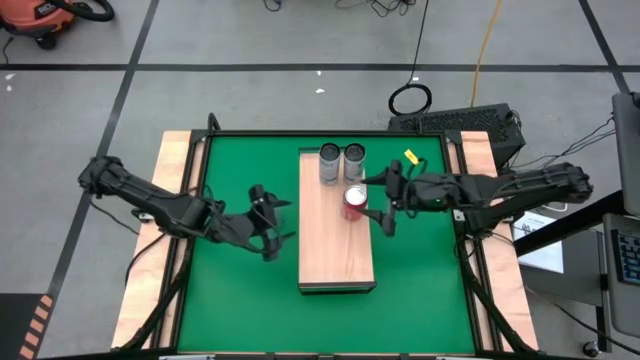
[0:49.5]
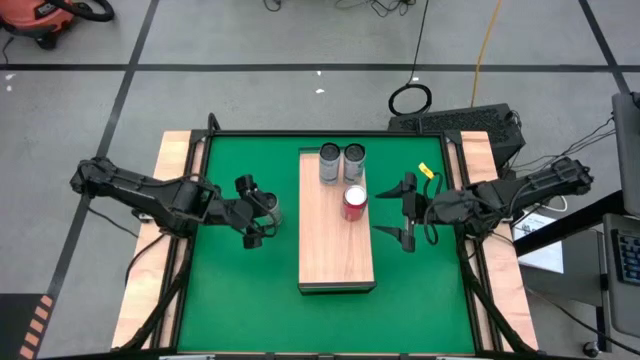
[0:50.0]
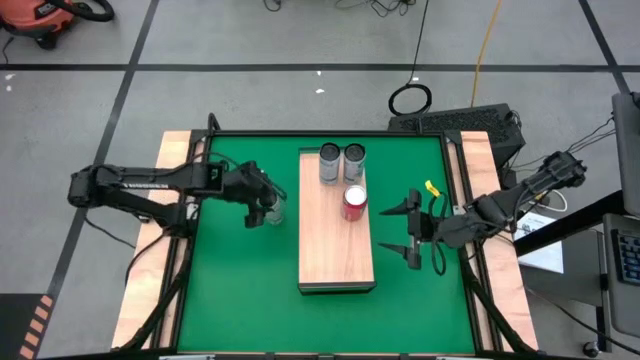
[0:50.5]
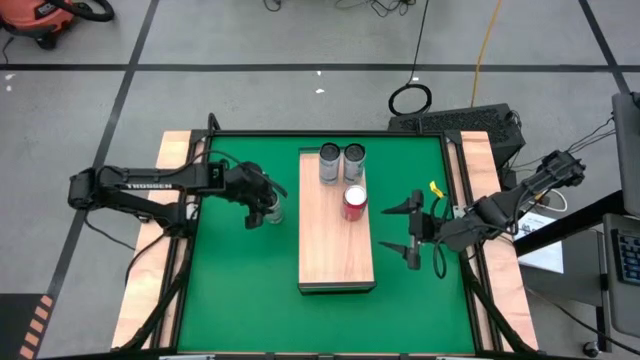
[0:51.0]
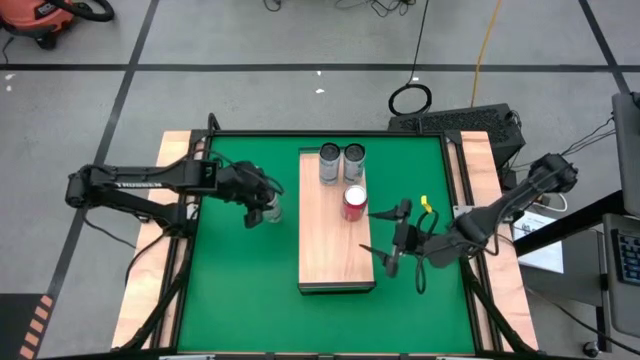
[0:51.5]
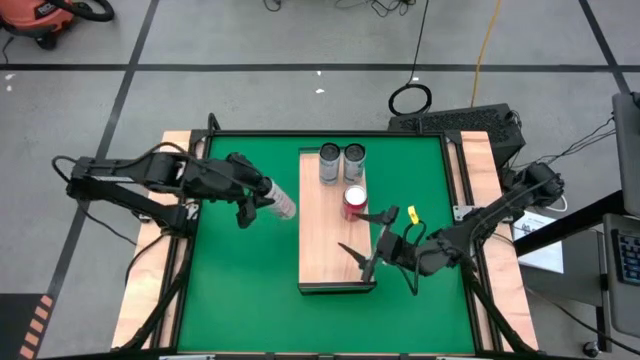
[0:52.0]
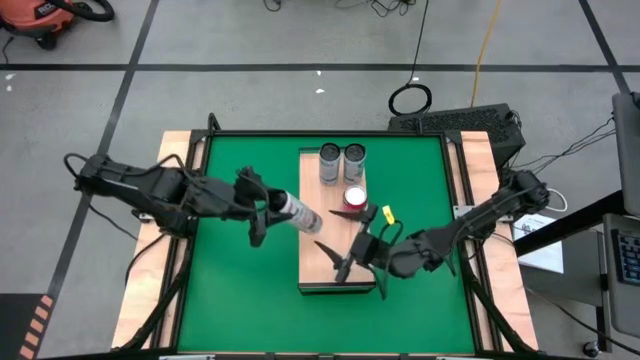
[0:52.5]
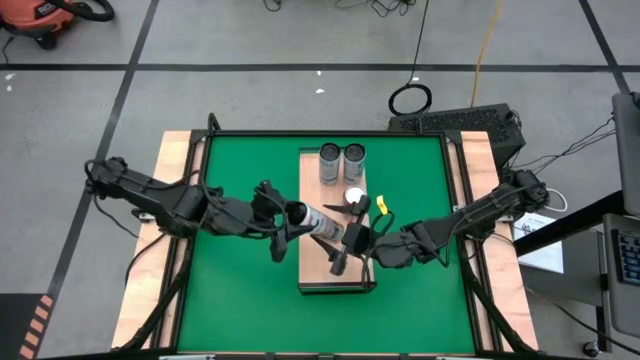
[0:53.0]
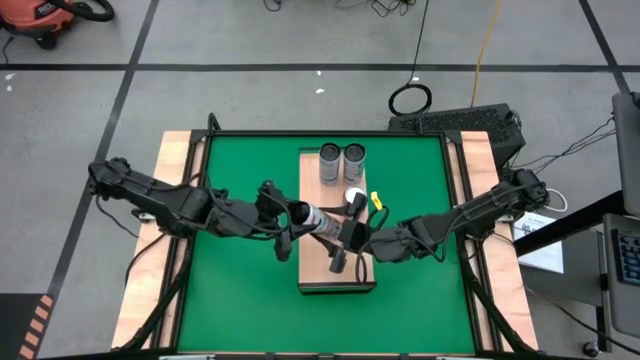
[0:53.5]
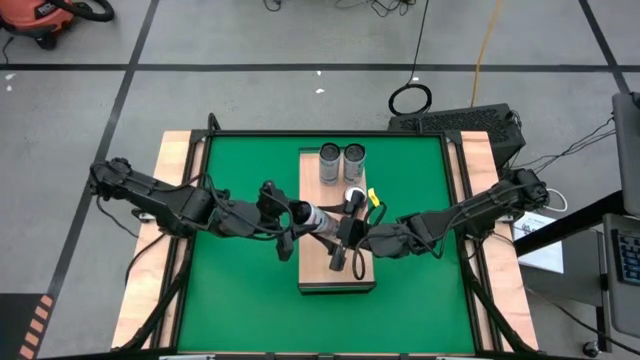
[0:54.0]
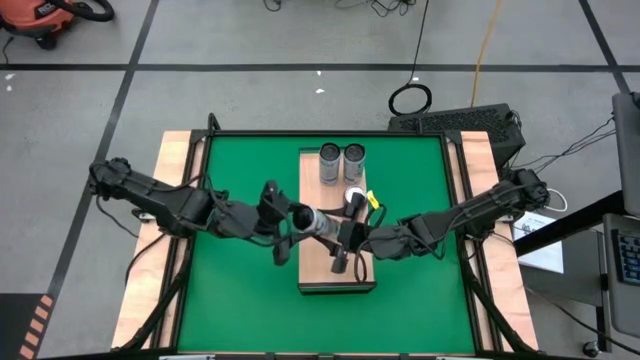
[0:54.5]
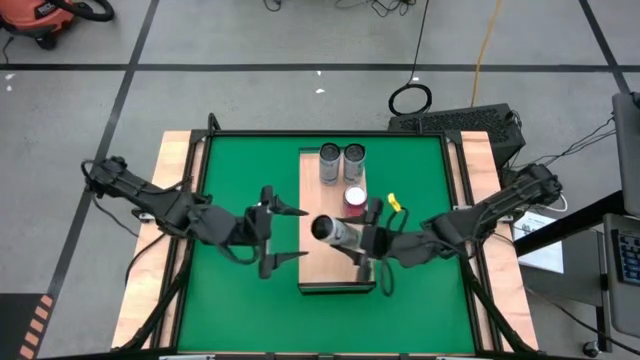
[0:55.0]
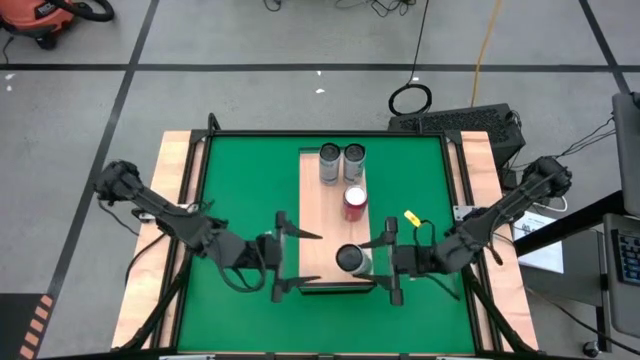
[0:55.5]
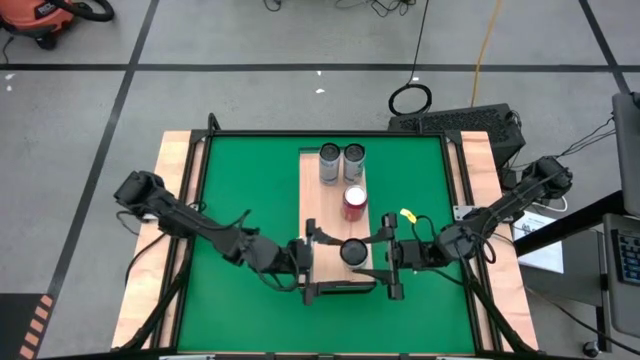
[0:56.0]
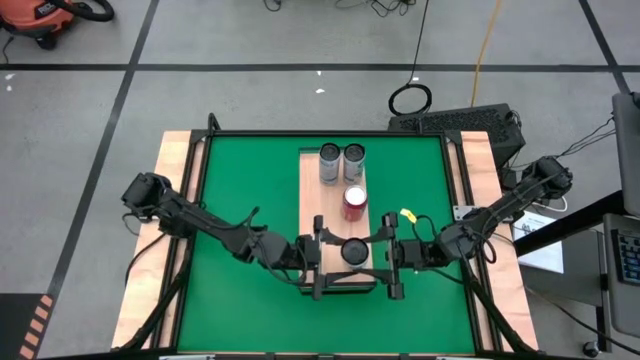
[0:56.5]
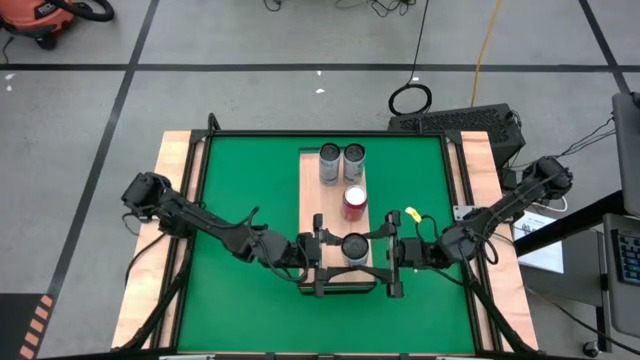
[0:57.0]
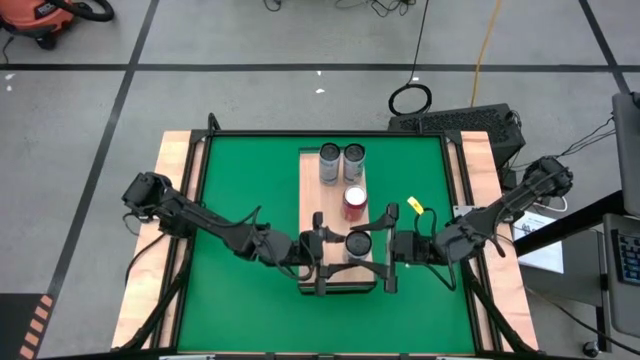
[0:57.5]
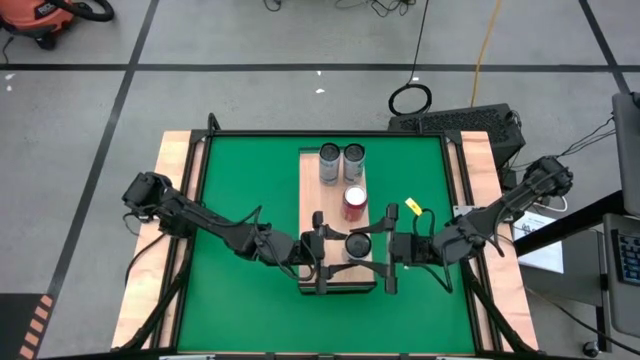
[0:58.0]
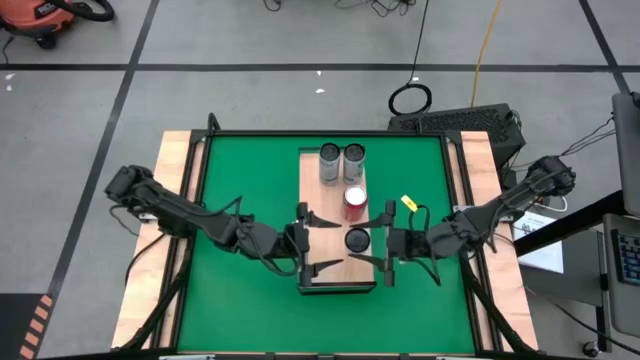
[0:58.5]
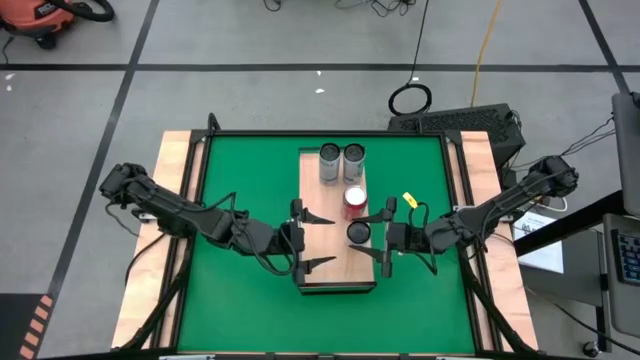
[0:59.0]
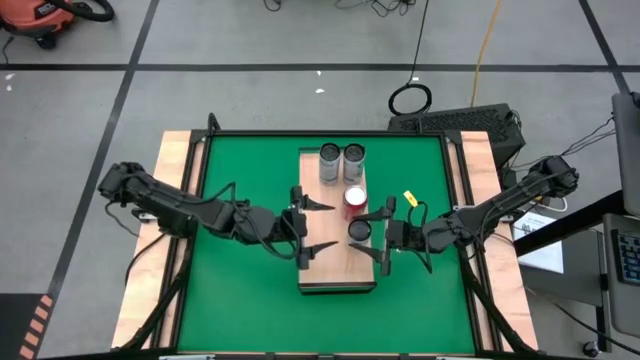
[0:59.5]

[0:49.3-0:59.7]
Task: Place canned beverage on shelf
Put the white-yellow soda can on the shelf

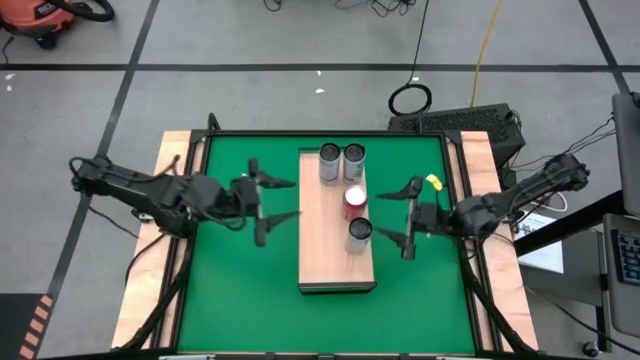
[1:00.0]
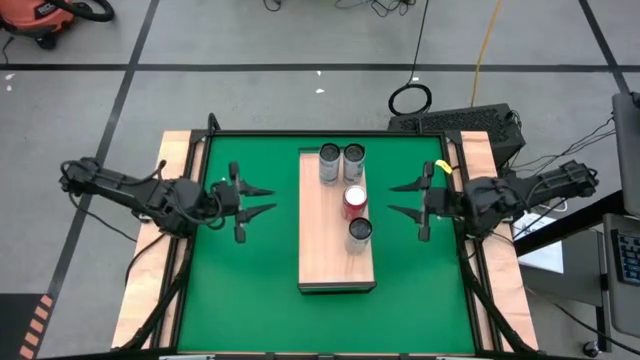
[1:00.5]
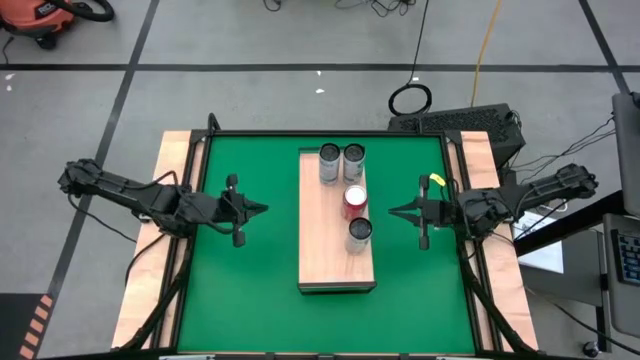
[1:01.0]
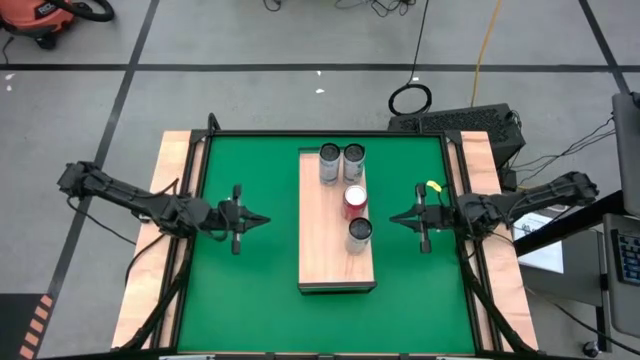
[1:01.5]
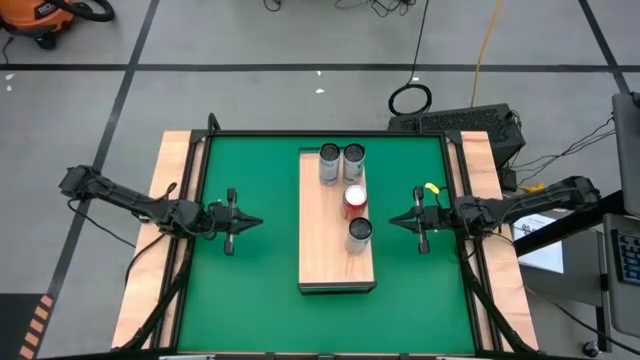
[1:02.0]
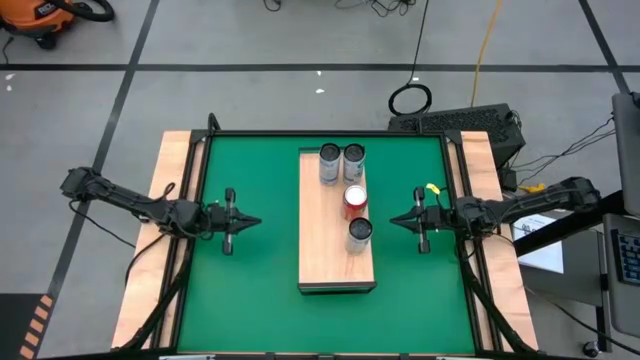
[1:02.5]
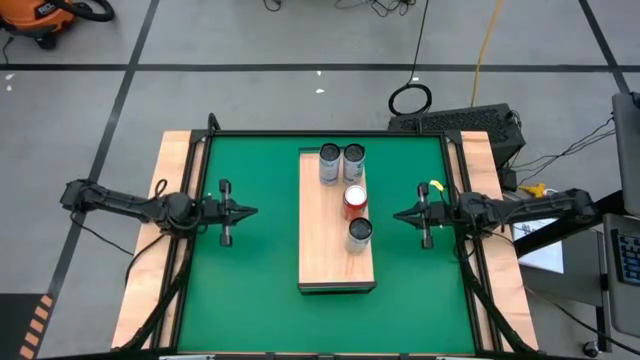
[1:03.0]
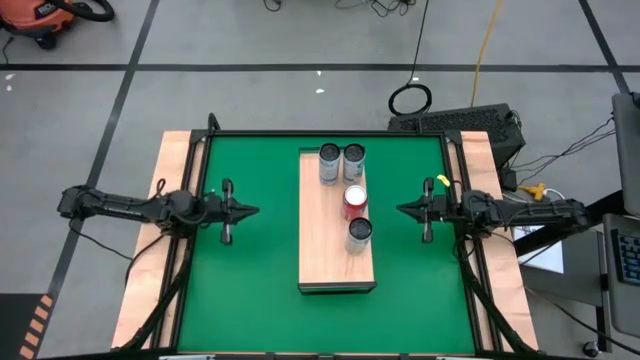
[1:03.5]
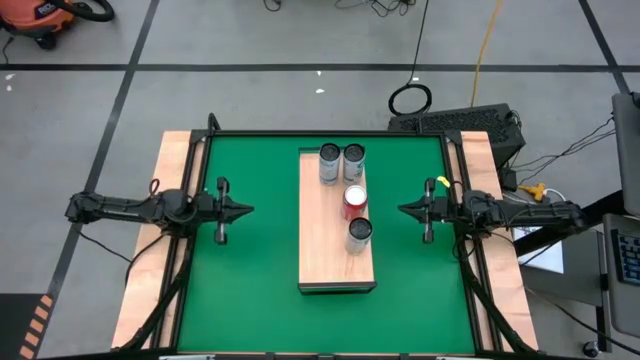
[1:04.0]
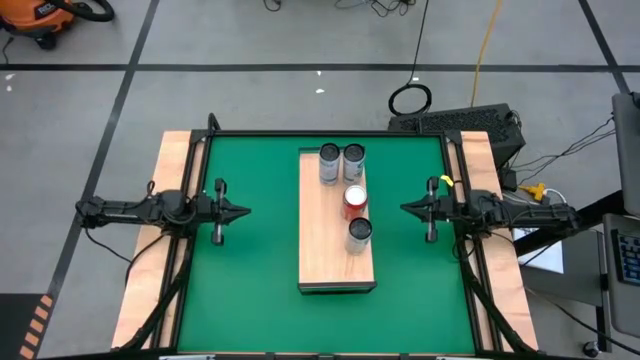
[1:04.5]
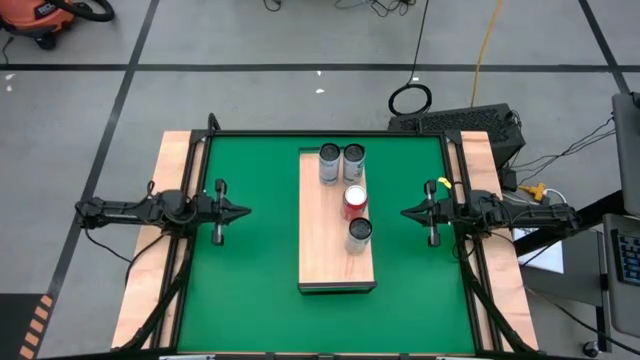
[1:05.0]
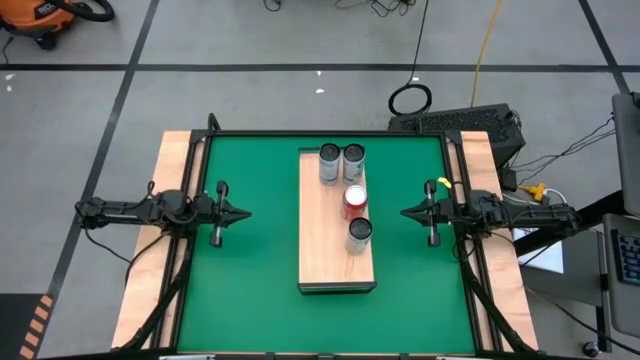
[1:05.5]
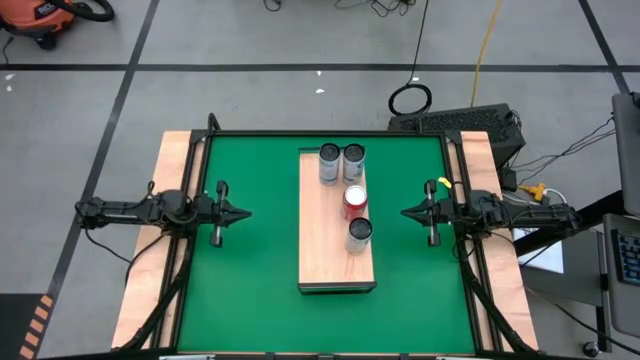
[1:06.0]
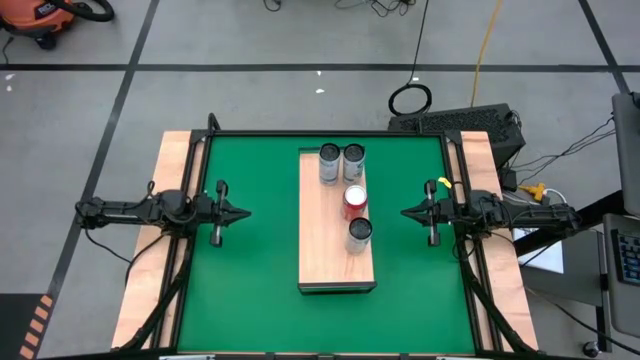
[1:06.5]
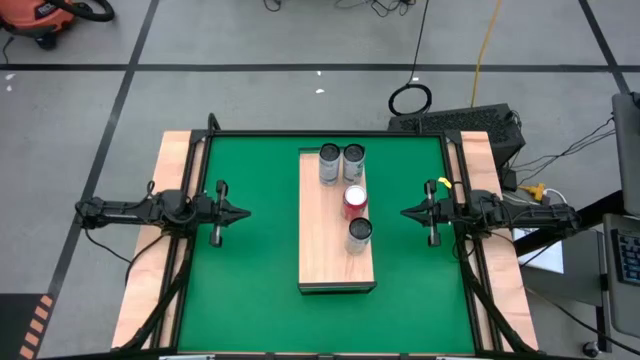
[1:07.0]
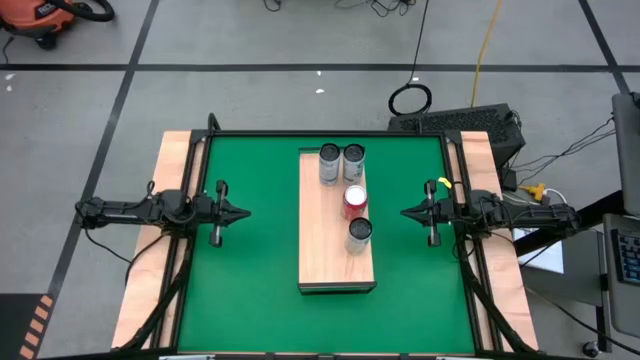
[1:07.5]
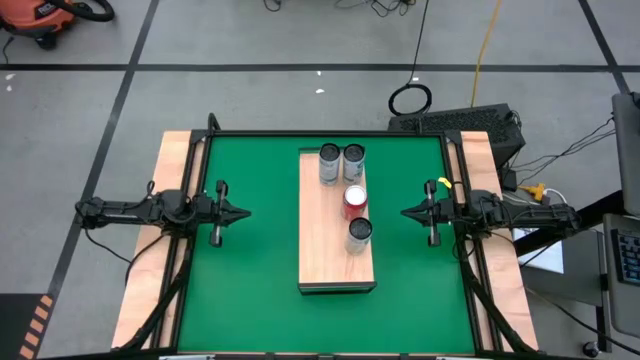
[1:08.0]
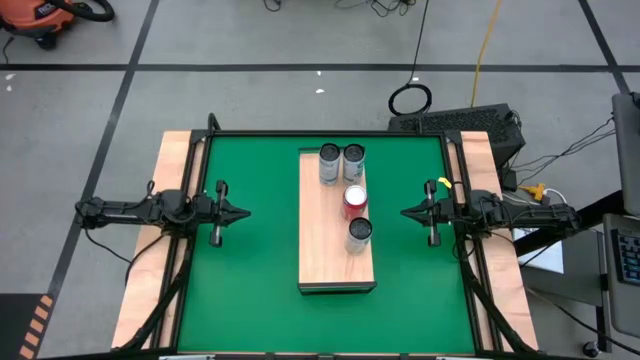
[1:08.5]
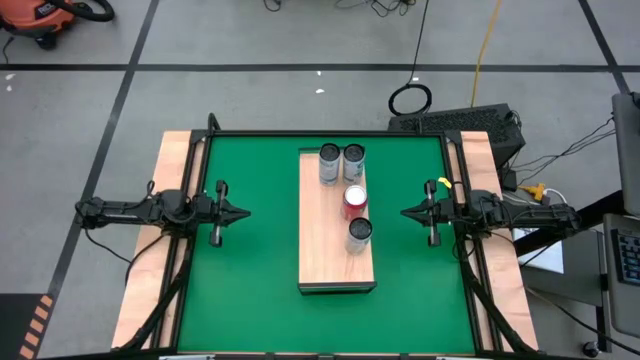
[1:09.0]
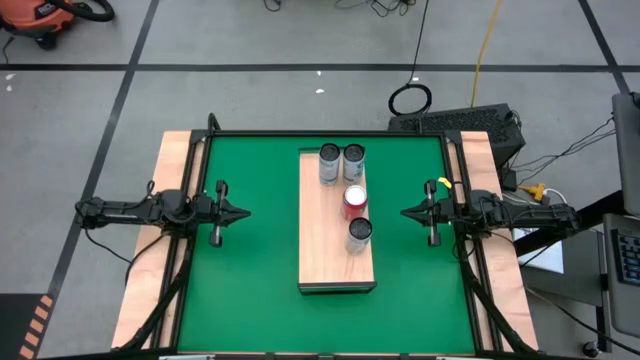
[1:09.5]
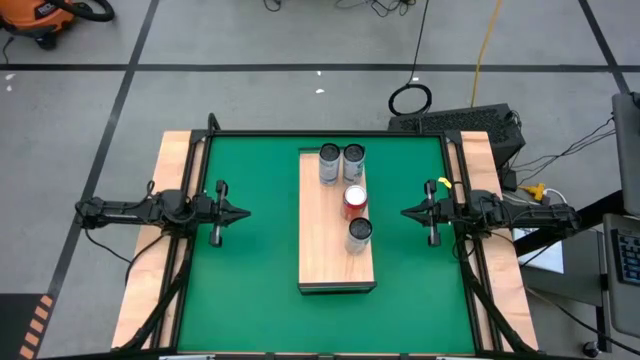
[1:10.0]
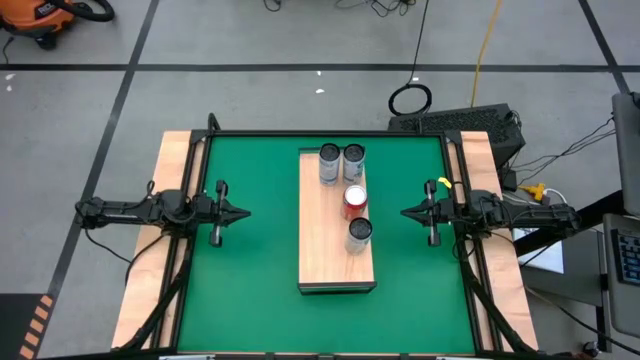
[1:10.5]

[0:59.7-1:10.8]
Return to Home Position

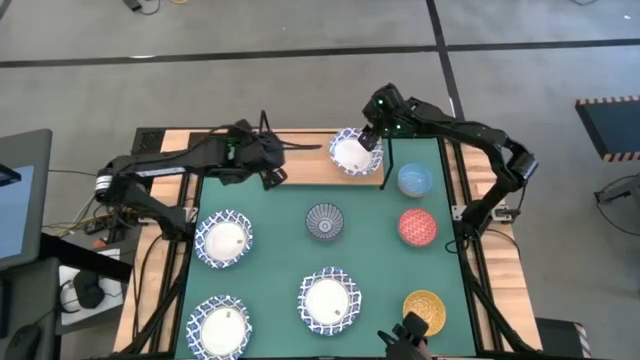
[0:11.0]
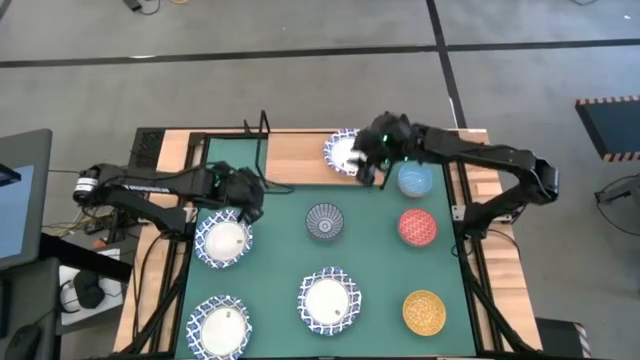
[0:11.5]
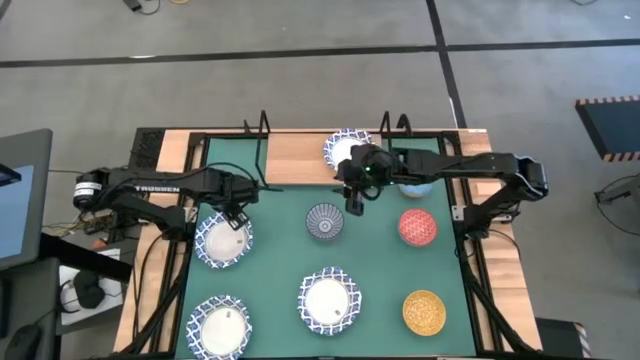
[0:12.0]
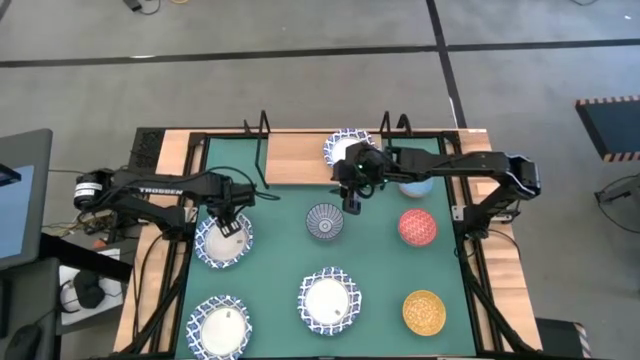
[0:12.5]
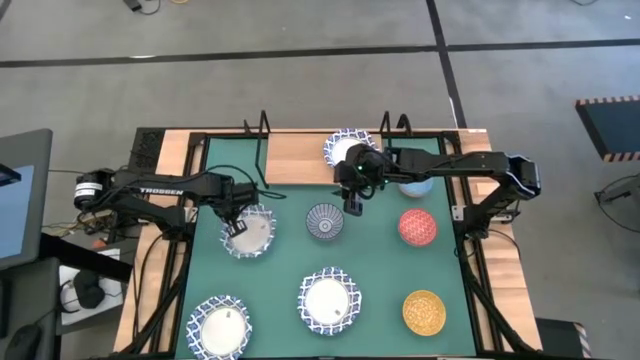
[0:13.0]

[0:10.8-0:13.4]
Task: Place and stack bowls onto a shelf
Stack the white bowl on top of the other white bowl on the shelf
